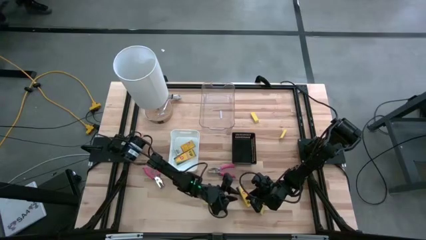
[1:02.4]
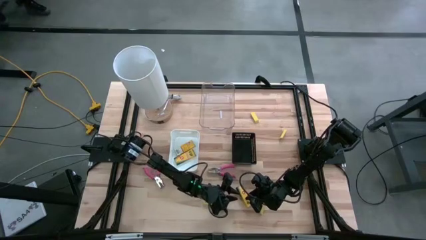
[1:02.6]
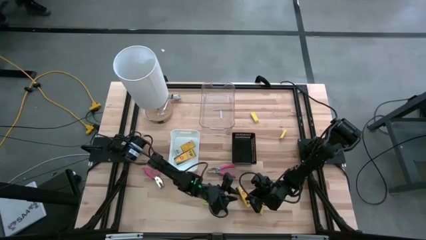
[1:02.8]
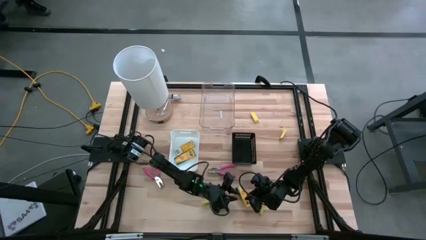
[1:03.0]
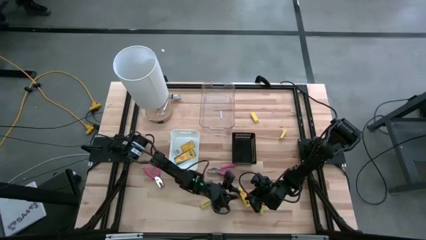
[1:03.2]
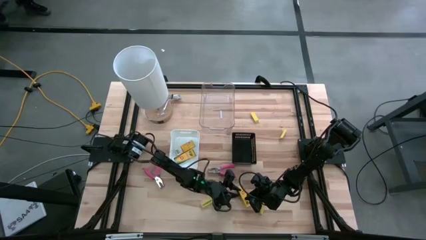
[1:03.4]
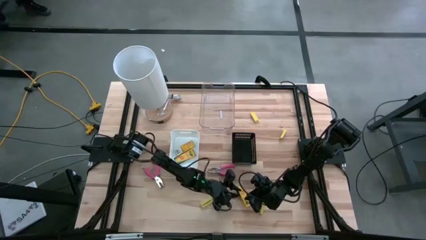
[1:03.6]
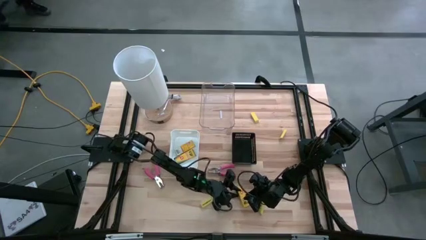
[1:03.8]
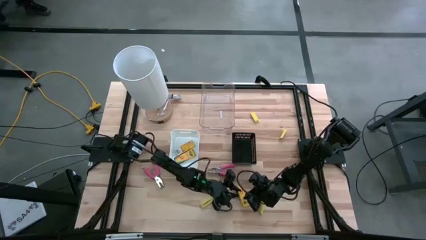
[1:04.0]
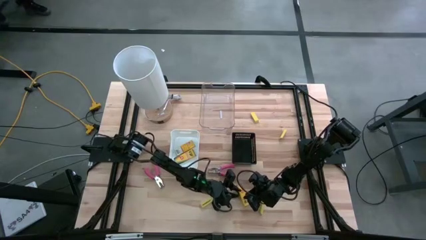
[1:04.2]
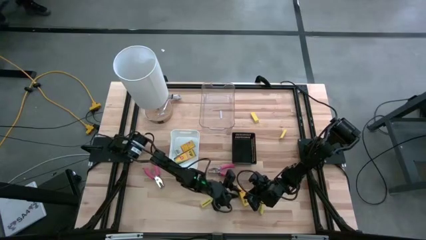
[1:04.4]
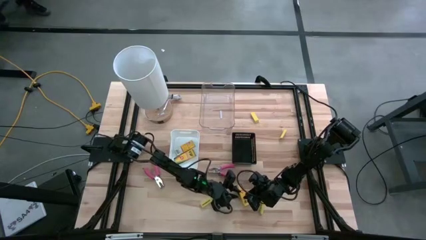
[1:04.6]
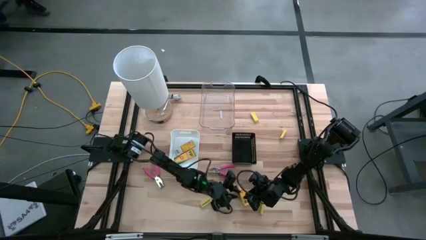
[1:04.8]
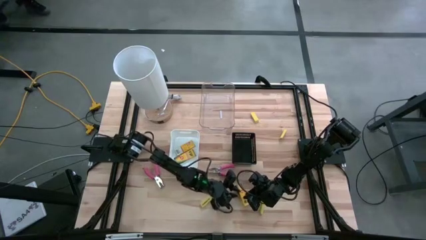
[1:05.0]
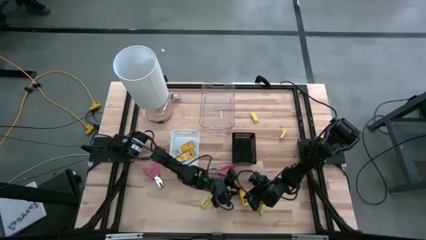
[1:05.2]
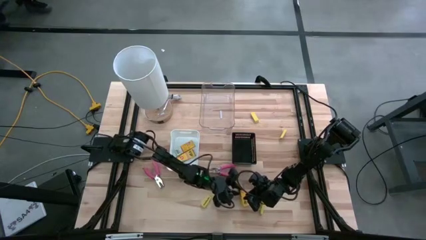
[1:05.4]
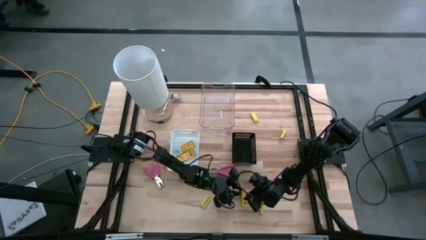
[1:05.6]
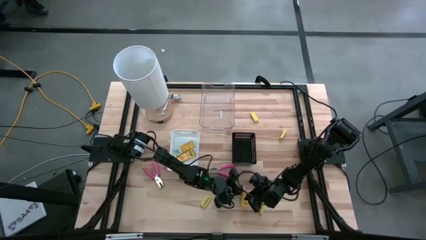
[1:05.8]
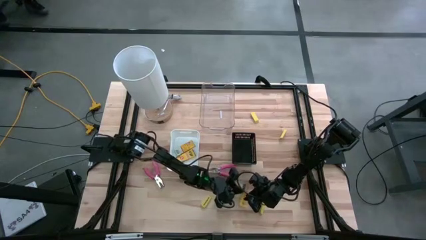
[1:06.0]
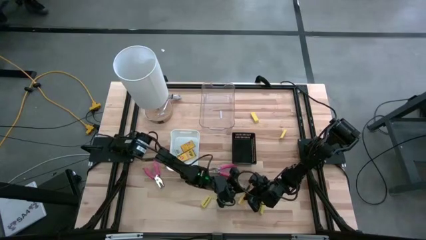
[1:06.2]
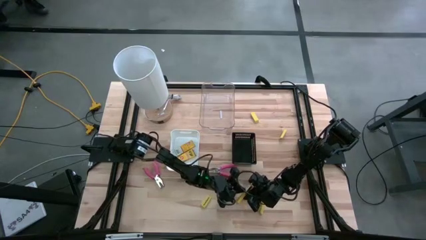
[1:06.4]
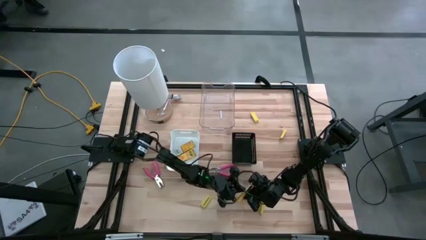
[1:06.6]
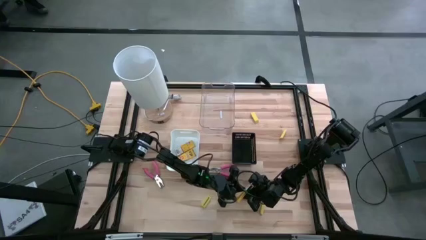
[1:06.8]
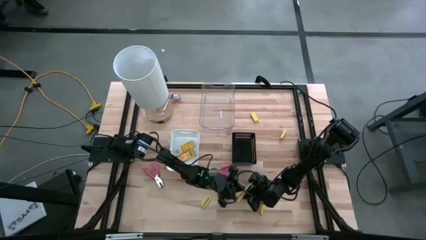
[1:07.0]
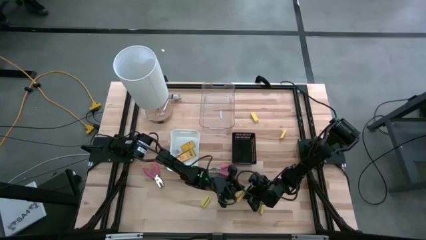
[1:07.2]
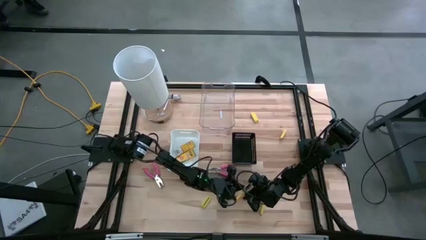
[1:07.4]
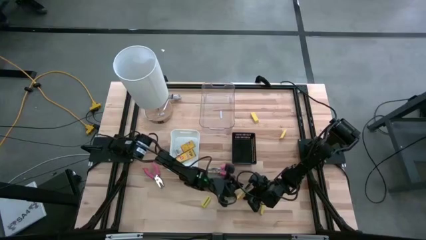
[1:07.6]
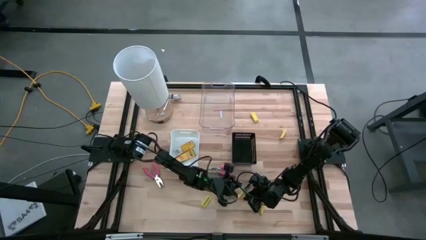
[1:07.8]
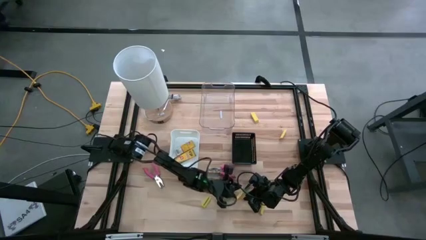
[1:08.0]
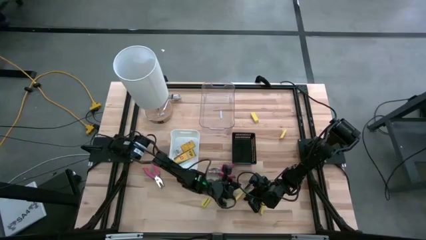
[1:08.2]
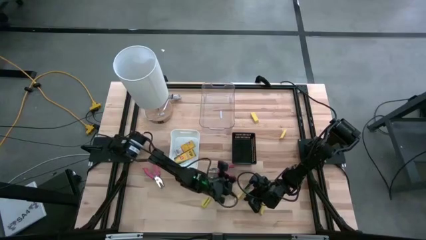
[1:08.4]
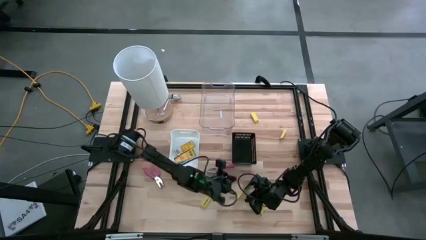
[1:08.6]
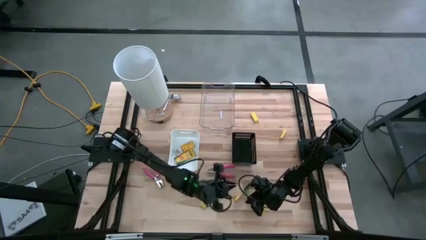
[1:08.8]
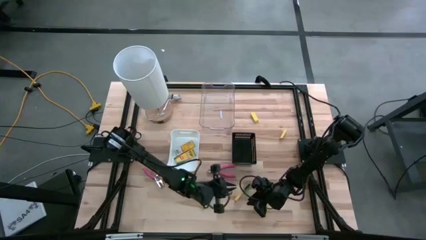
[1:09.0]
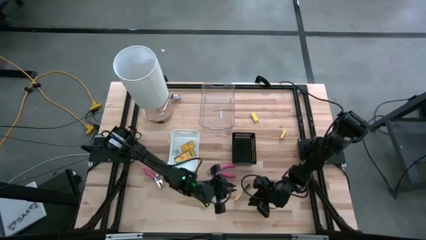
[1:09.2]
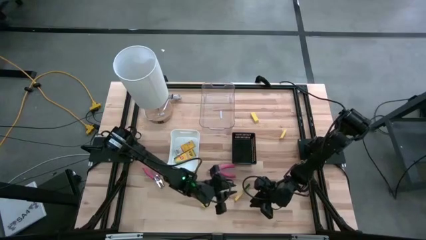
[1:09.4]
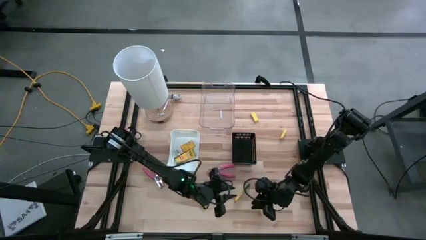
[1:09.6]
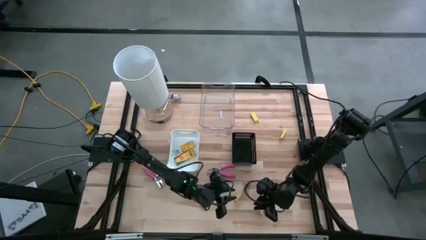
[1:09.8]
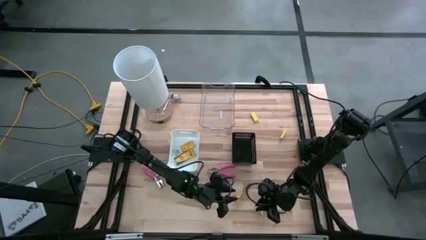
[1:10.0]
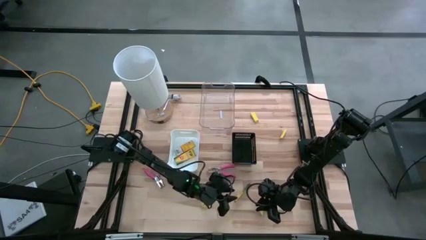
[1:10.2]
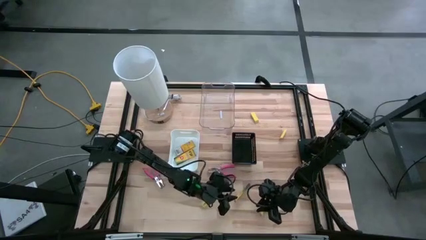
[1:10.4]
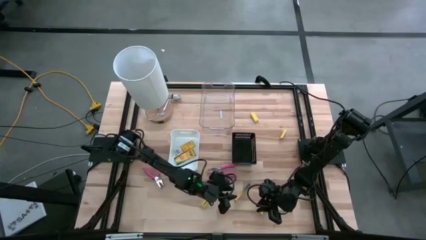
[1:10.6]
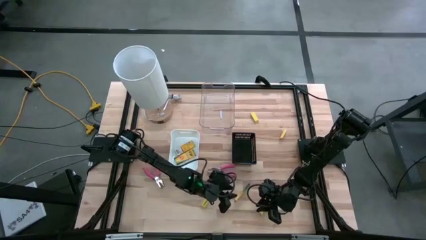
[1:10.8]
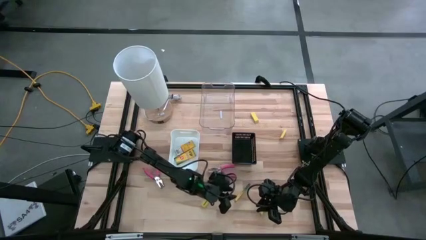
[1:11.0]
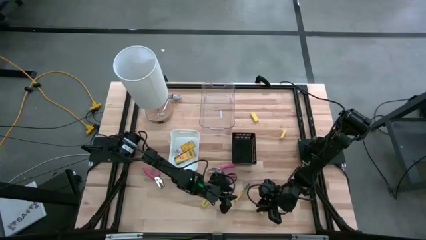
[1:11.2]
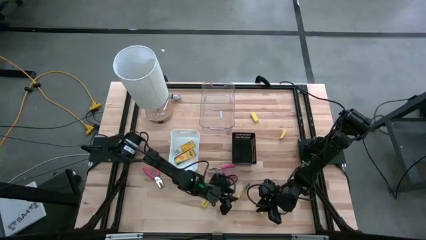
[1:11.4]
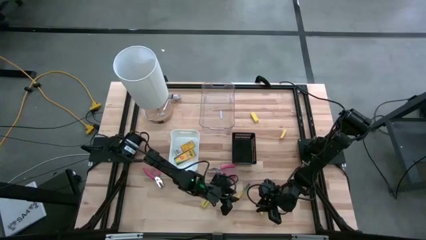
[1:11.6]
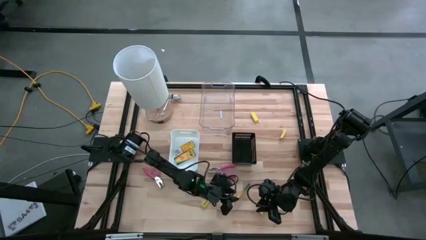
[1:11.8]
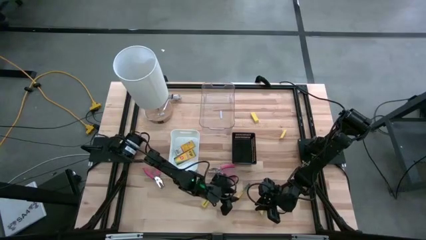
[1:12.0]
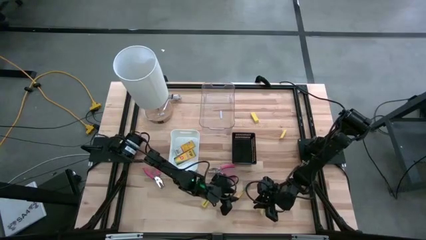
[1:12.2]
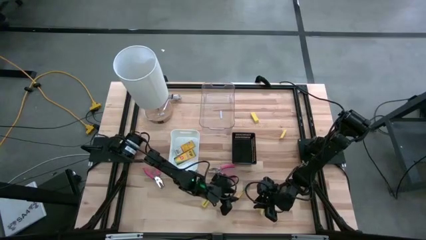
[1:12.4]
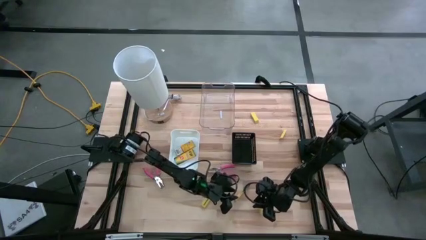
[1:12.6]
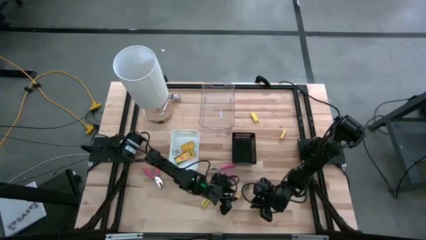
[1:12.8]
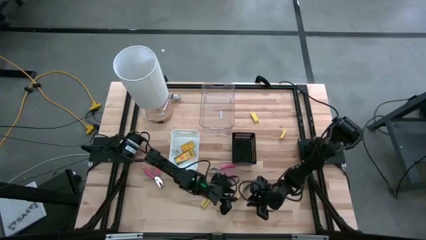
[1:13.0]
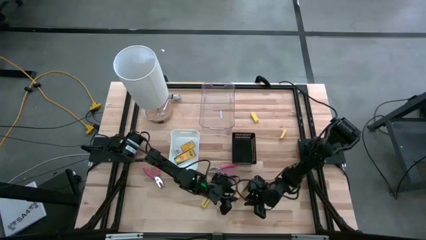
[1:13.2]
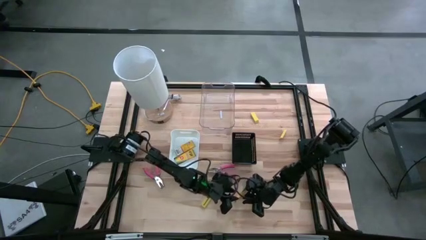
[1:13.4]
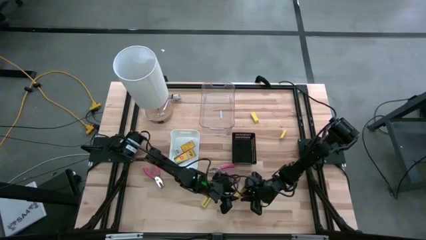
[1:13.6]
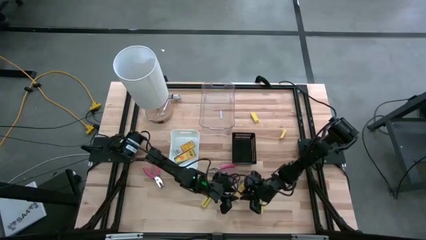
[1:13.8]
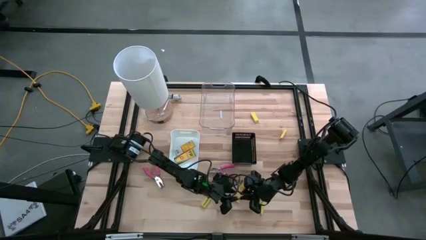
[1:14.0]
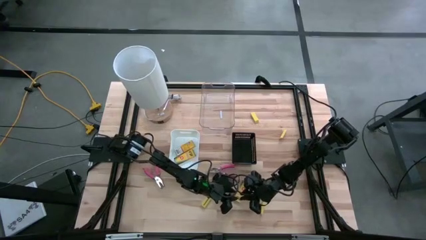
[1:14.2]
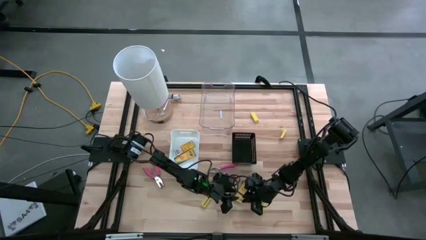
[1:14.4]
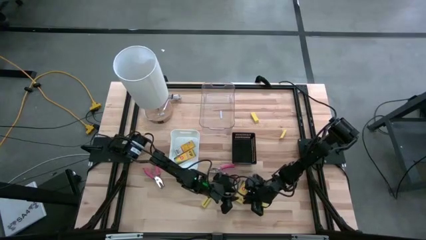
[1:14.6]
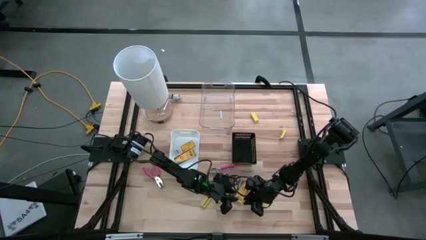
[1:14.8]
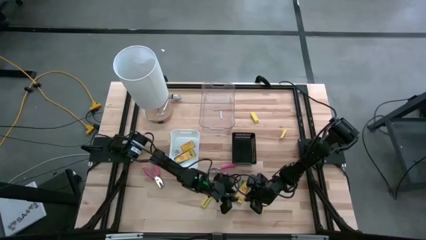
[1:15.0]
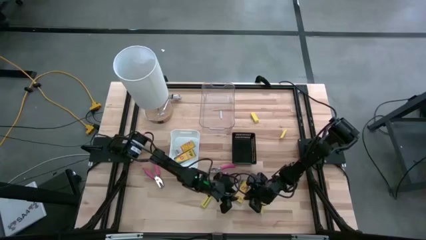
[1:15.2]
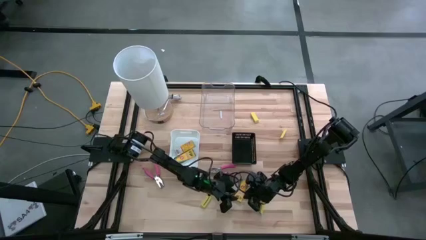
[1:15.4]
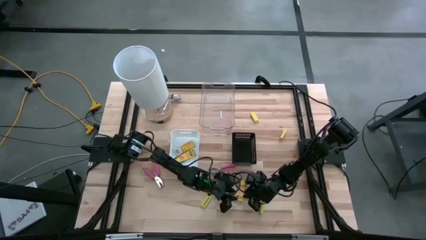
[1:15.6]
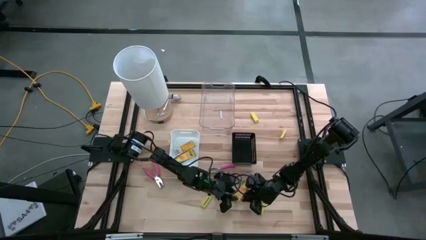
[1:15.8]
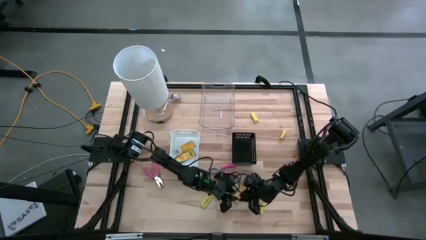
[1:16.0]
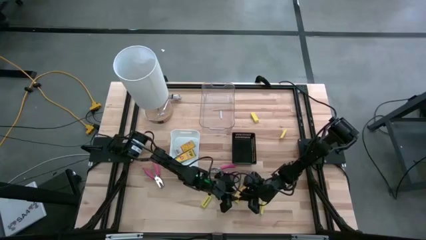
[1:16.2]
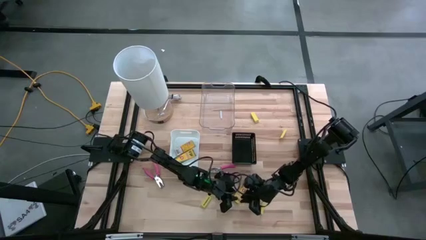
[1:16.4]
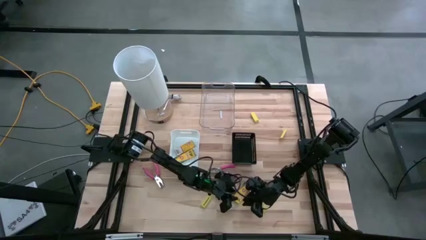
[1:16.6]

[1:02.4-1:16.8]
Task: Pick & Place School Supplies
Put the box of crayon into the white bin
